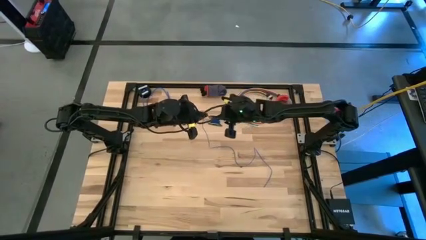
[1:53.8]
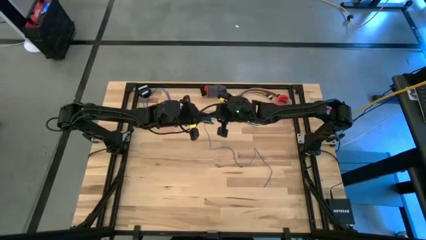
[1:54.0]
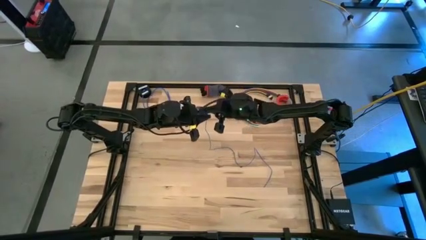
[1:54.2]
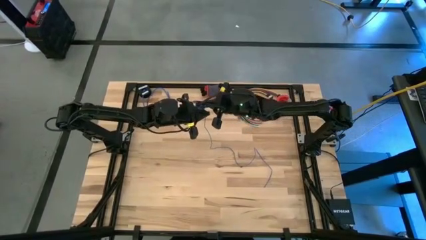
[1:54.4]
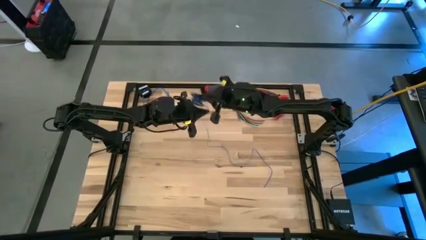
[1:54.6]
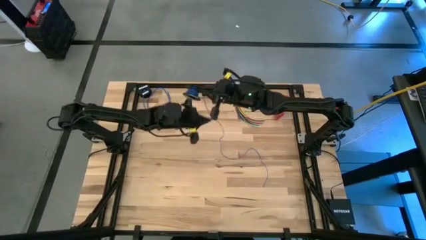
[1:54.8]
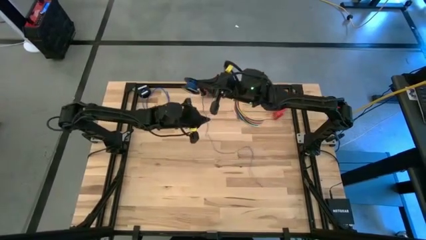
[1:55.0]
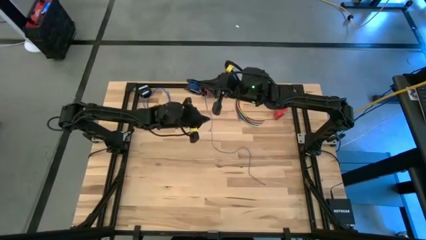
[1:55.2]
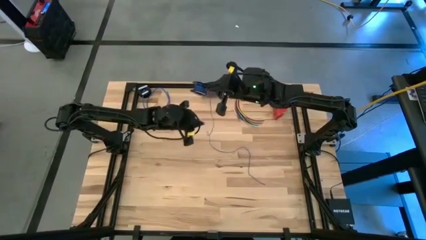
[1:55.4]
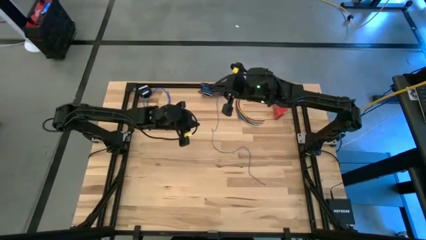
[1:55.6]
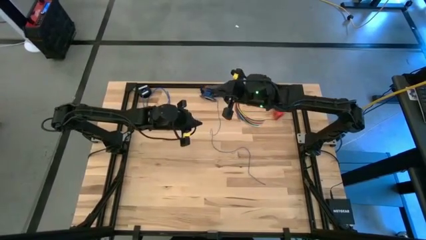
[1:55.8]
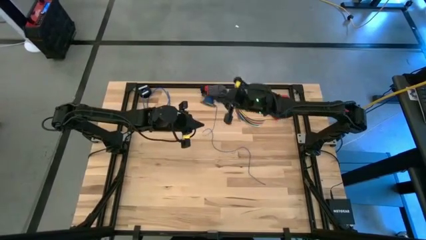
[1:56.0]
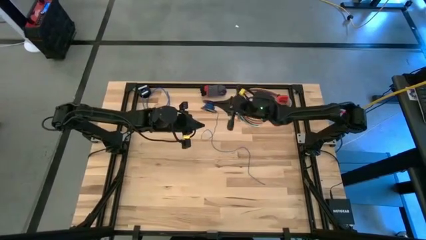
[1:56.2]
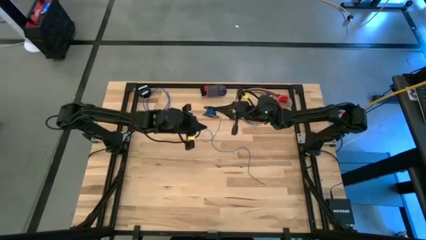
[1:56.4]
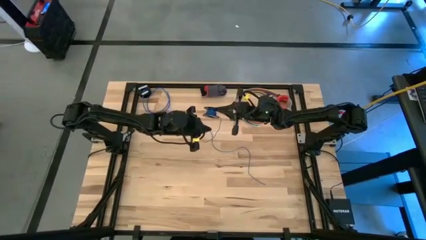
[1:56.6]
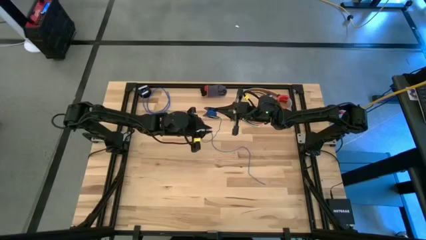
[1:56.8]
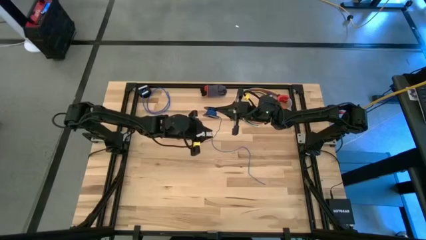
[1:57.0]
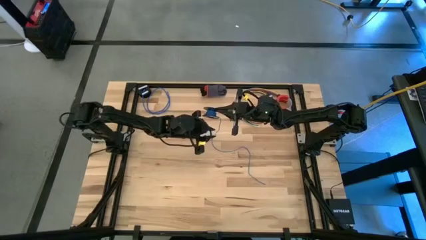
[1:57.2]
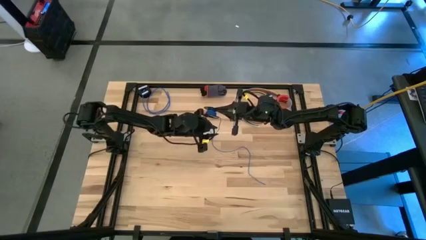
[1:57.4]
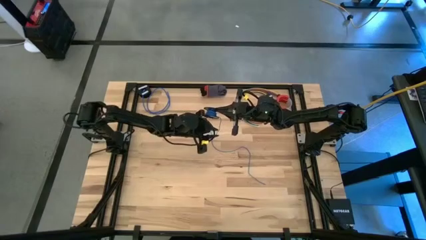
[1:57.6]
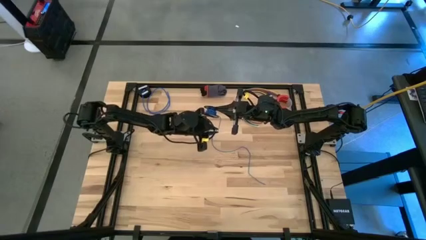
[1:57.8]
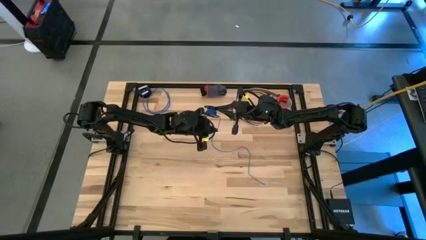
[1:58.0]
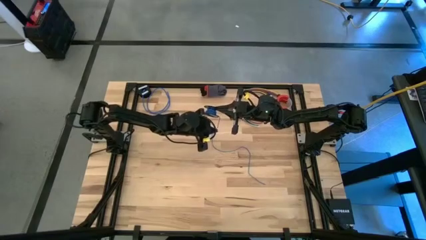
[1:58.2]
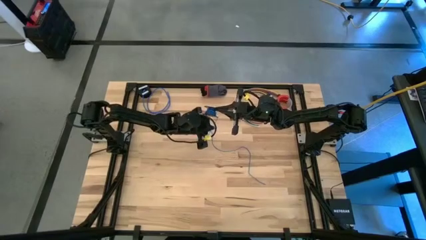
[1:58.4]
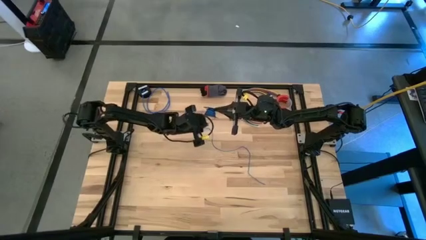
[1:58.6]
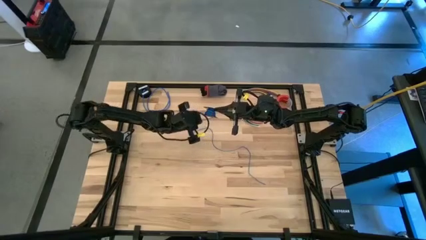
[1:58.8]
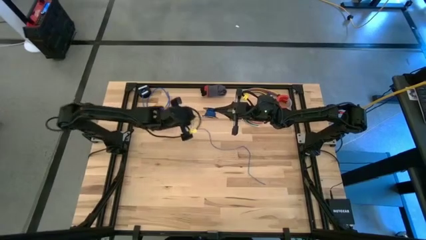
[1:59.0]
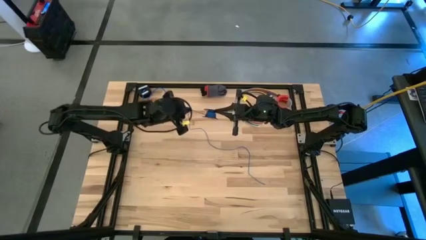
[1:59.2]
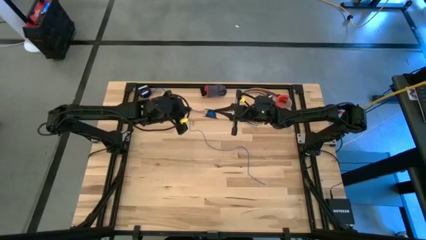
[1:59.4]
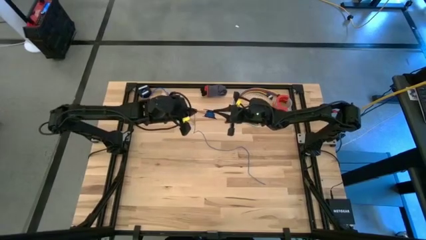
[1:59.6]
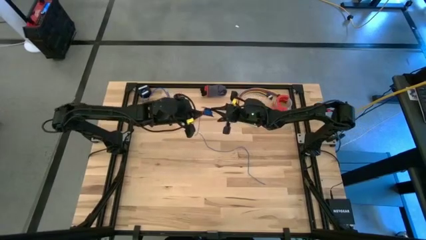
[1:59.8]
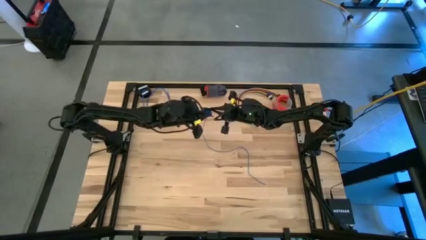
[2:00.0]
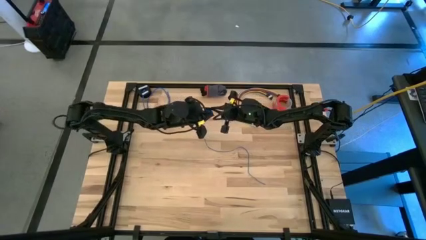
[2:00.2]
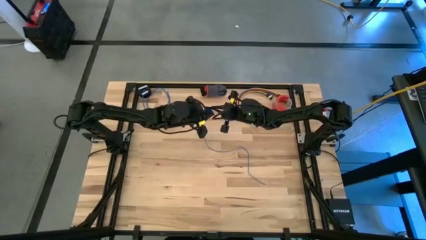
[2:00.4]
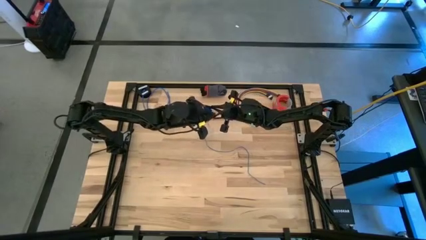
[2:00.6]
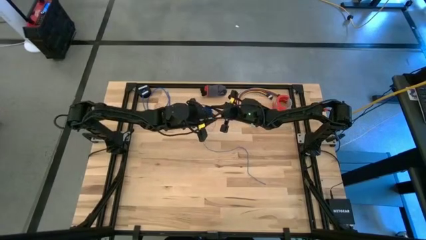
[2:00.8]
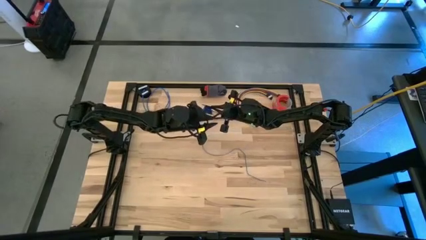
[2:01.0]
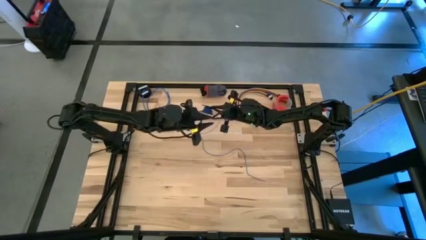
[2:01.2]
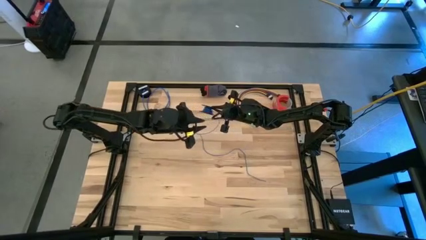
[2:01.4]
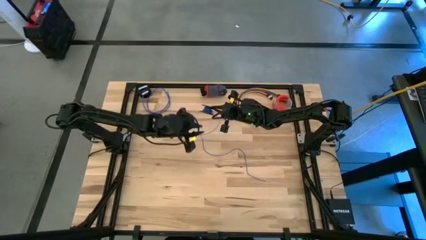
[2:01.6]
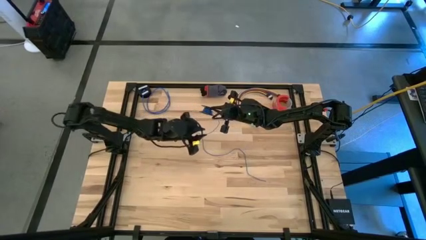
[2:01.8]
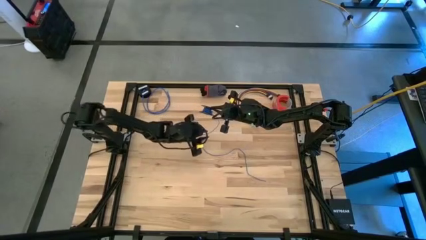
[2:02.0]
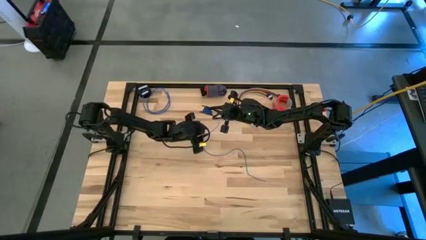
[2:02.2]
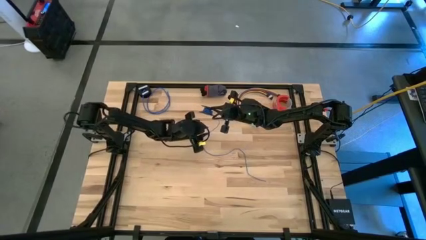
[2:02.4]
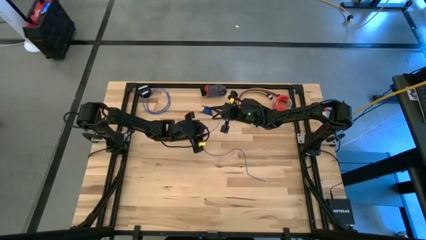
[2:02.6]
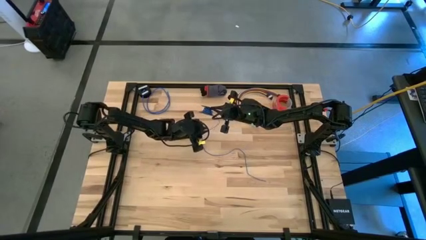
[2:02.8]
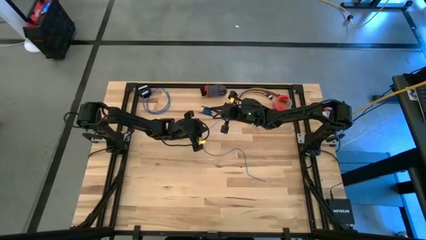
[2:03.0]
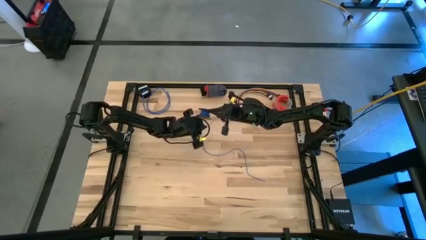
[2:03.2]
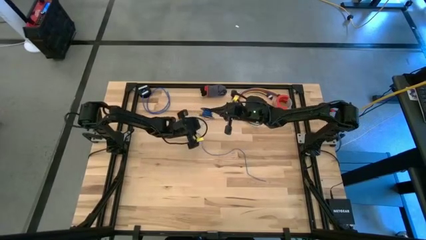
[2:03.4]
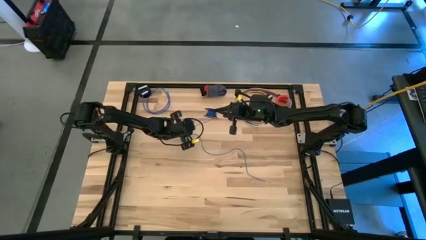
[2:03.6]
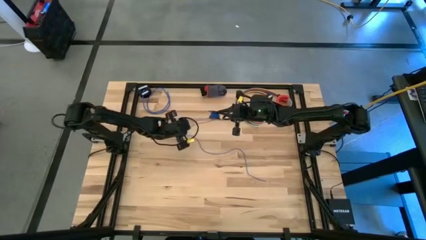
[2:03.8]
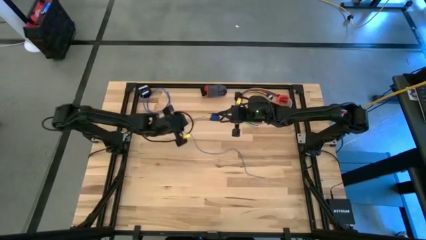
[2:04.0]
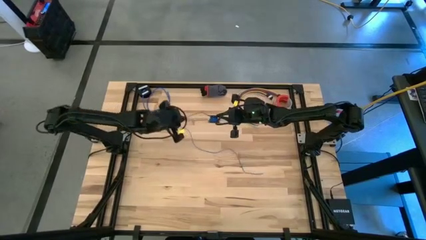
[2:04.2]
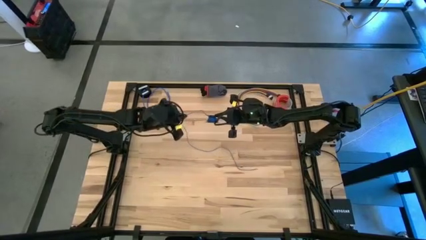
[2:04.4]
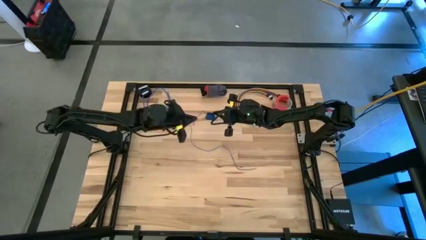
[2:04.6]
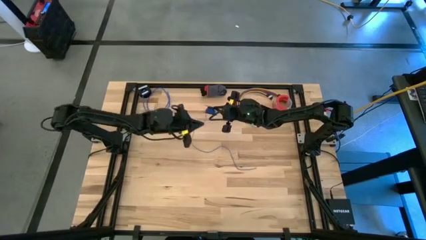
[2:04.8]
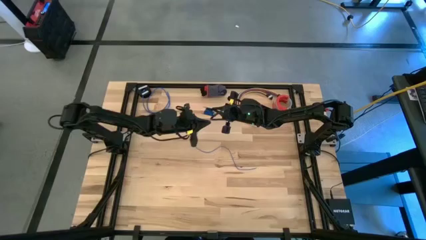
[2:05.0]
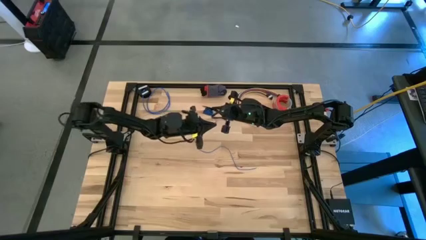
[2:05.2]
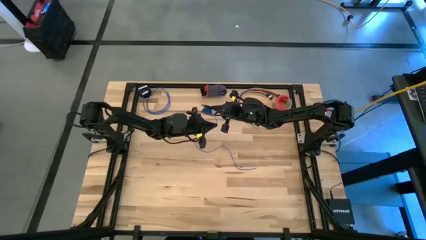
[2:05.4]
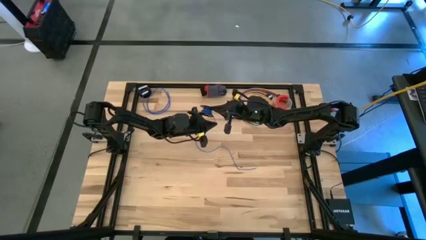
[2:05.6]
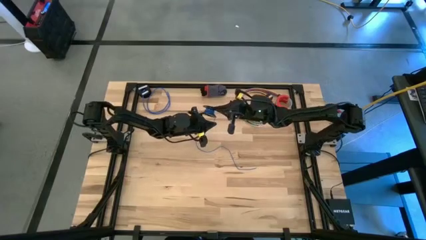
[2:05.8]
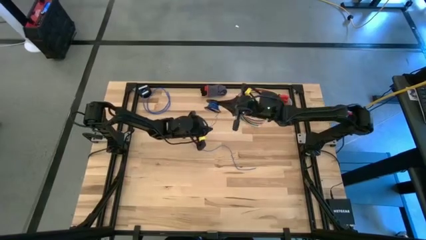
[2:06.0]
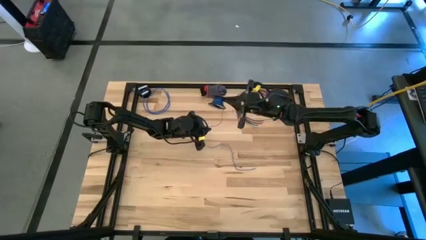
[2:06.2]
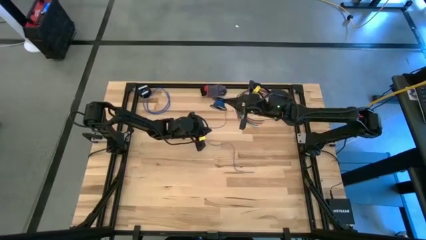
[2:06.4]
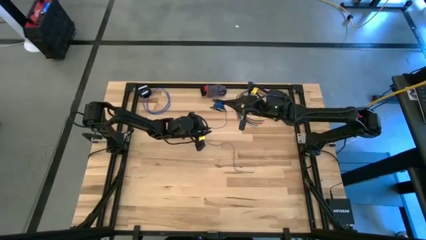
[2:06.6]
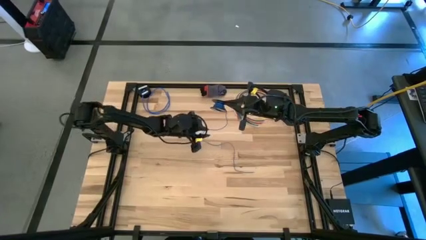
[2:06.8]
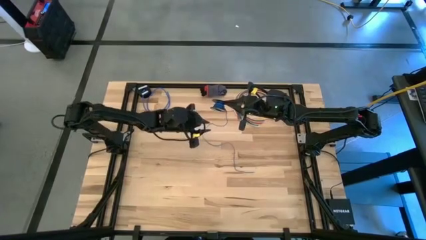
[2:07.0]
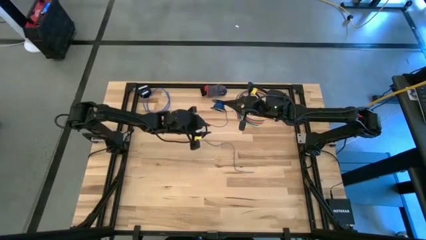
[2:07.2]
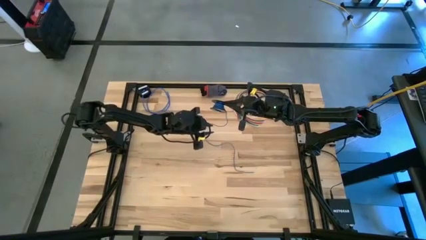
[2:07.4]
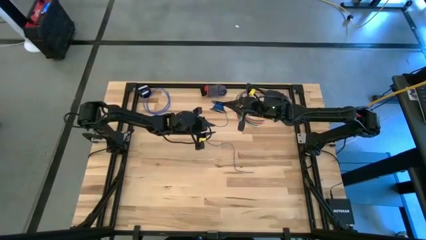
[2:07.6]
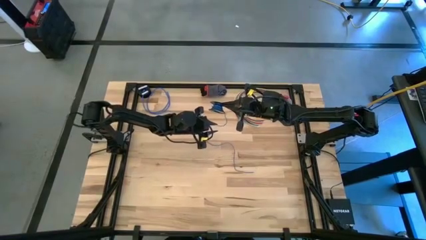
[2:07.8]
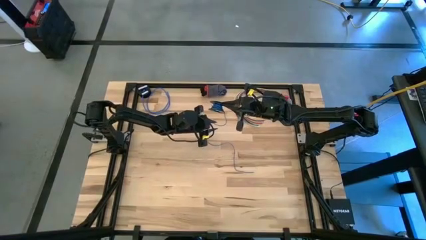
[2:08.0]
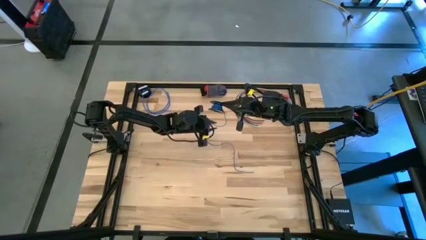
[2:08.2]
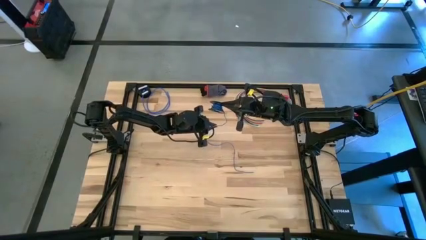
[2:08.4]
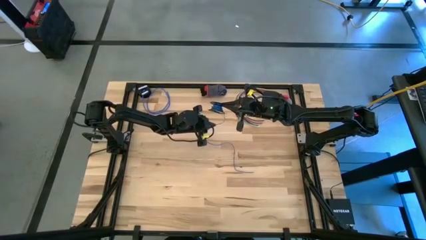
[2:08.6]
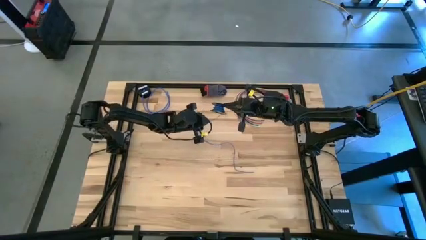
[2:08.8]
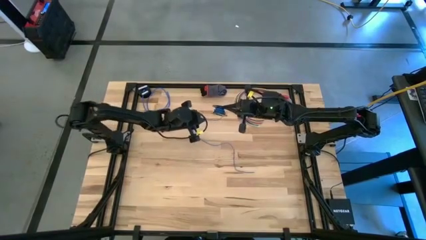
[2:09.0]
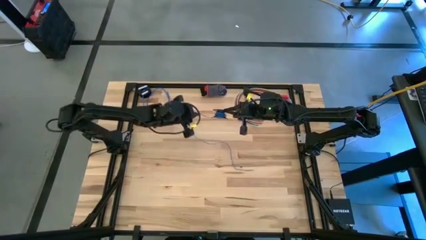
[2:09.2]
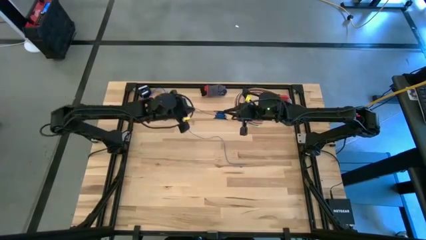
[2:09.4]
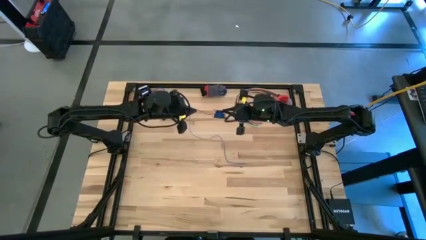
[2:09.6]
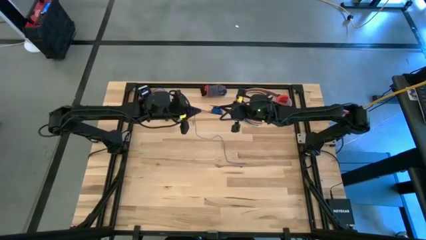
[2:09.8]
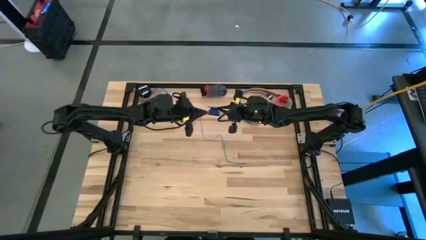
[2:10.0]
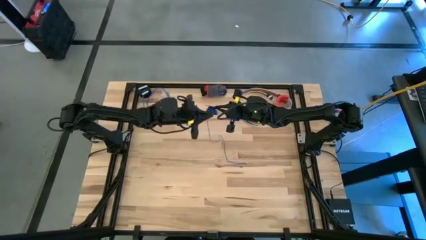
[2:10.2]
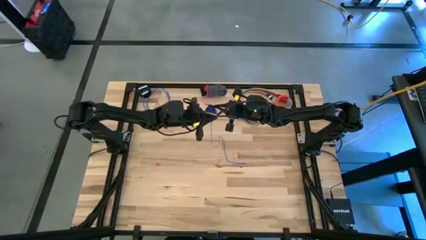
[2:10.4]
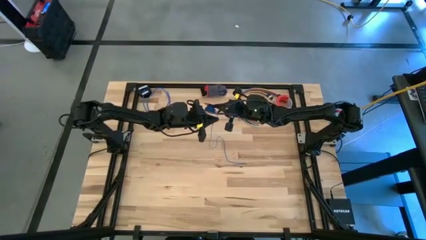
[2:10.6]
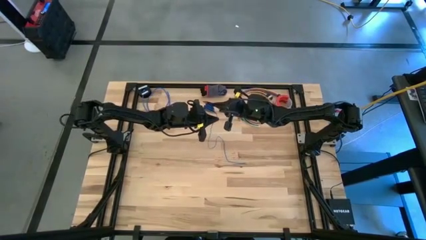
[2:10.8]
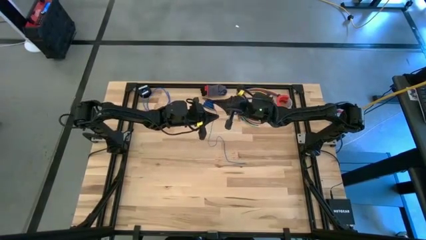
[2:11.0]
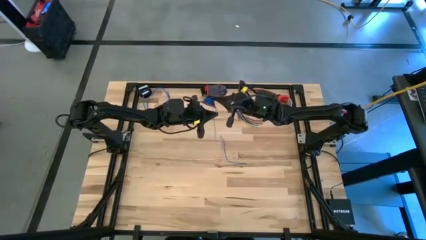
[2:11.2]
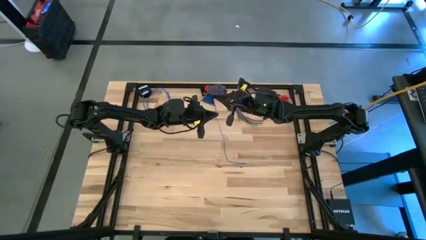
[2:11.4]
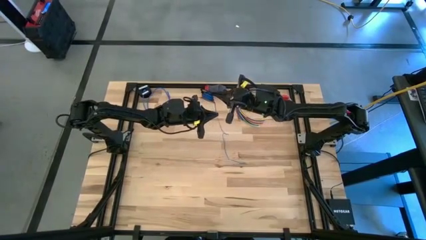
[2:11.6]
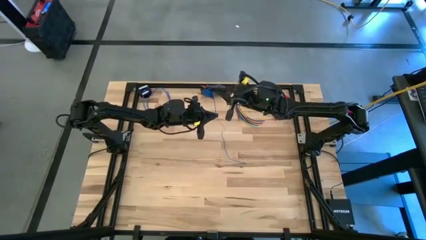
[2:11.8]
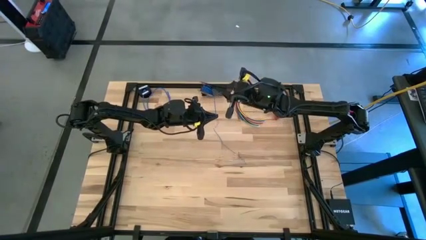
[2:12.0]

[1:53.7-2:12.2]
Task: Coil cords
Coil the blue wire on the black spool
